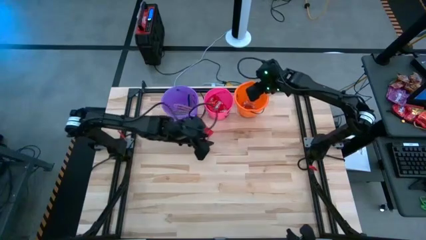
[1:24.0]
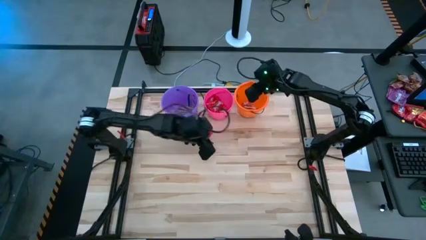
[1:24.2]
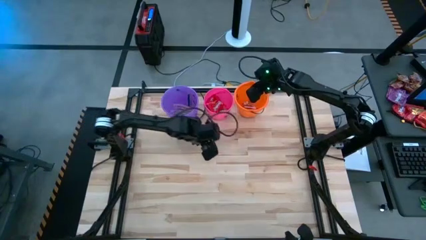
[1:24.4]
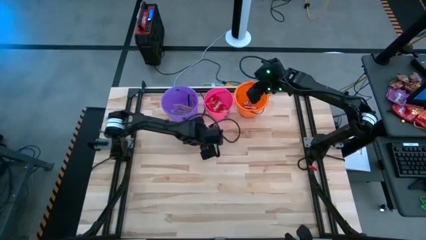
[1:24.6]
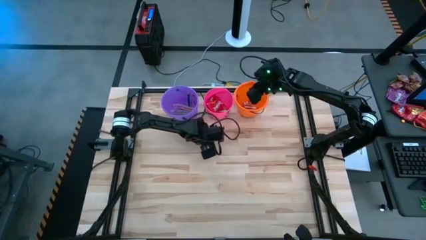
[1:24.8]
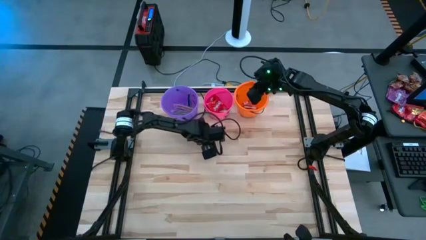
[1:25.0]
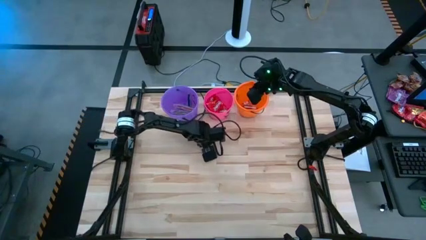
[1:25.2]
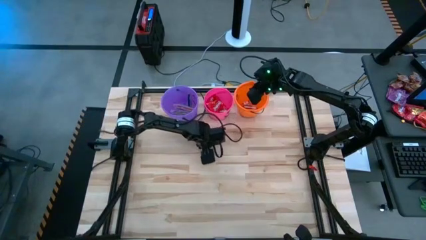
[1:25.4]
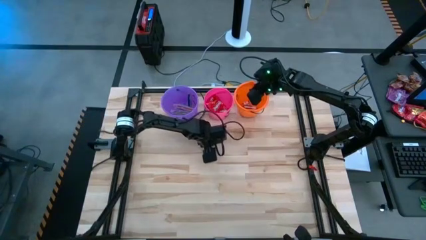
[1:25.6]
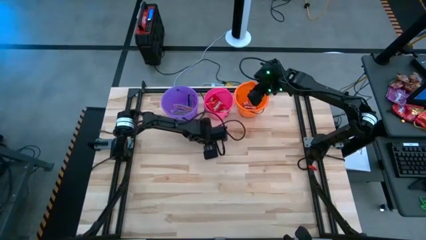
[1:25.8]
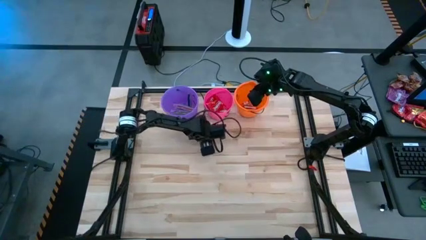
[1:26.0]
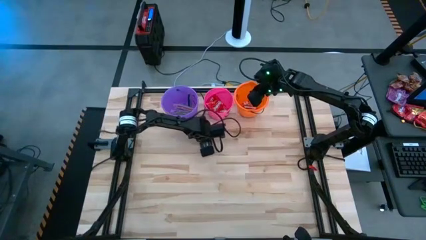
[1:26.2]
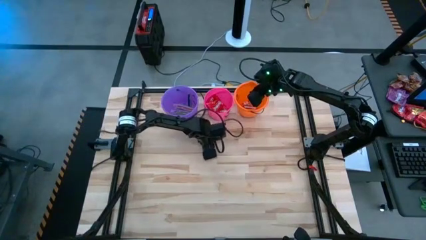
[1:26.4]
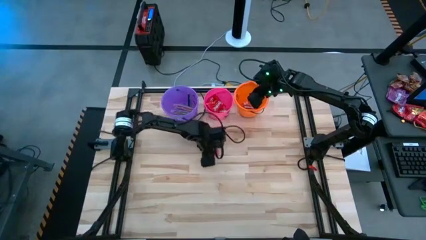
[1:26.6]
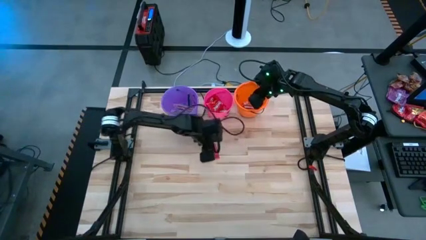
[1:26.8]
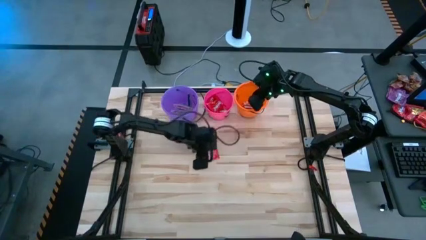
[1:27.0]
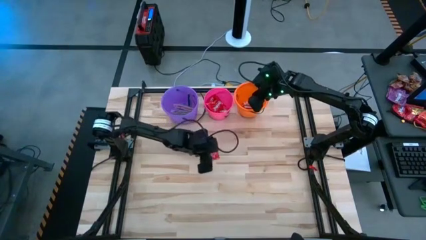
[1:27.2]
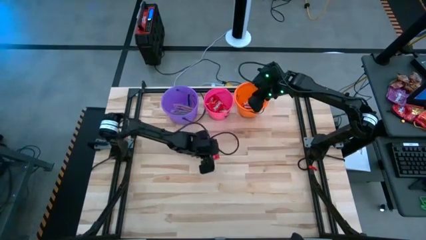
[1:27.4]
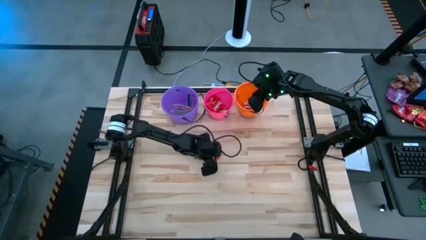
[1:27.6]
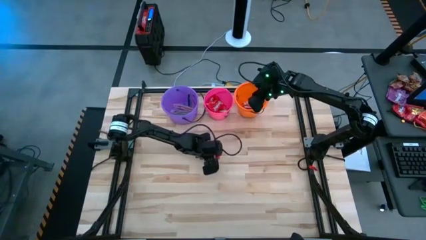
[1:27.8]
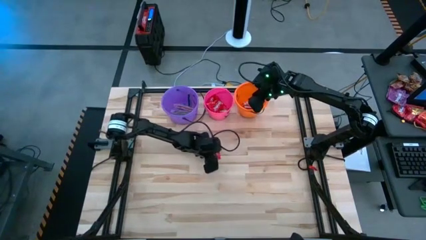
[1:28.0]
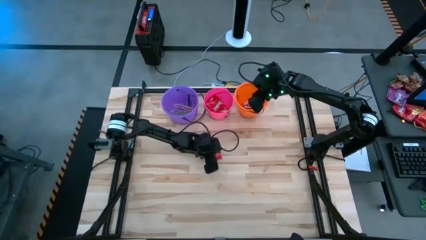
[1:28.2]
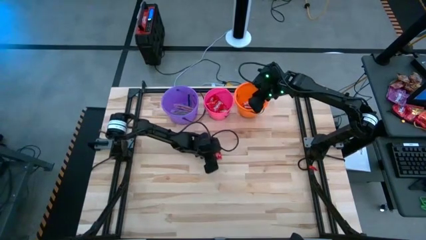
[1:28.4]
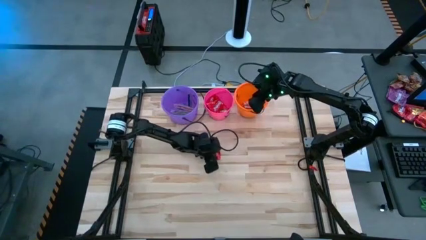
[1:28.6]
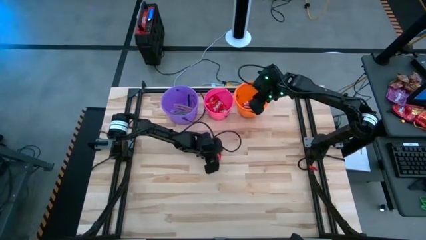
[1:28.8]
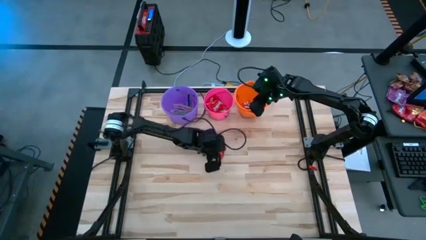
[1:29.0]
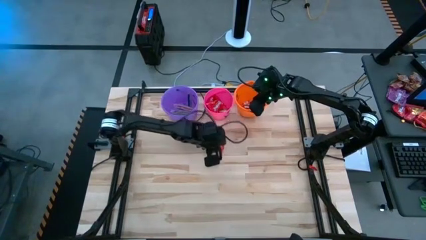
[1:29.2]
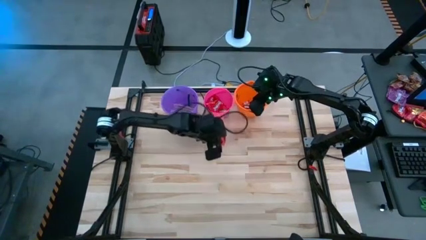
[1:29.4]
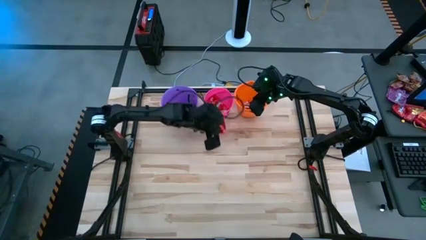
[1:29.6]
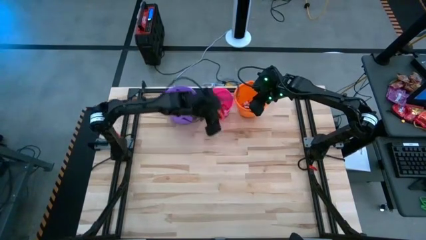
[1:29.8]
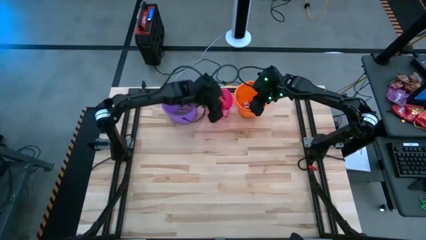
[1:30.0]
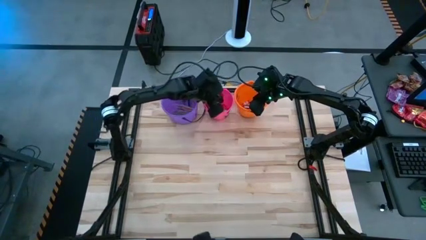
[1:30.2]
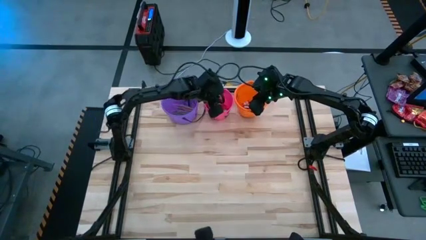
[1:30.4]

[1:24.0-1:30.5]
Task: Sort candy by brand, put in halloween buckets
Put the red candy pack into the pink bucket

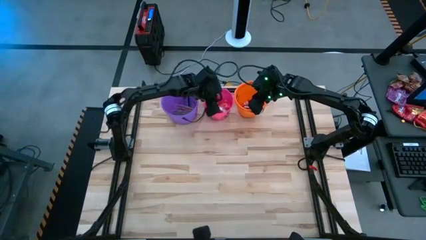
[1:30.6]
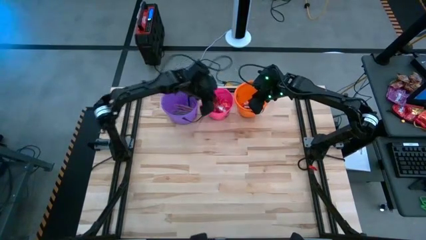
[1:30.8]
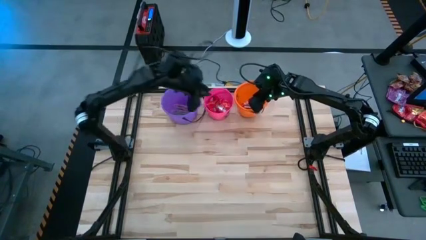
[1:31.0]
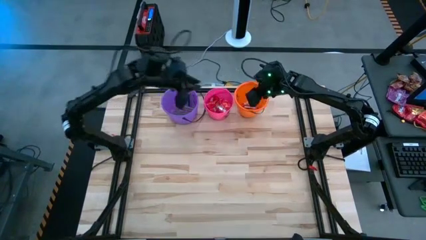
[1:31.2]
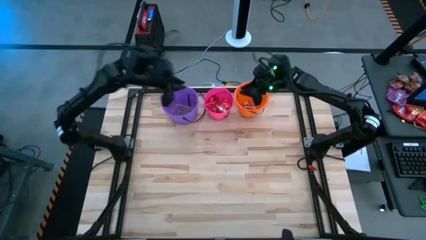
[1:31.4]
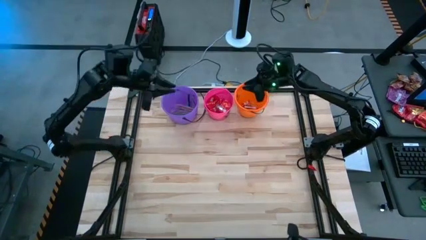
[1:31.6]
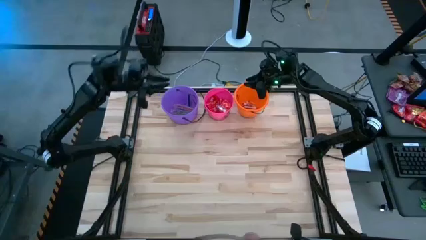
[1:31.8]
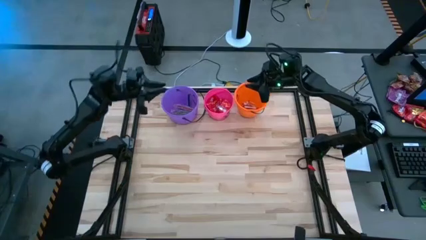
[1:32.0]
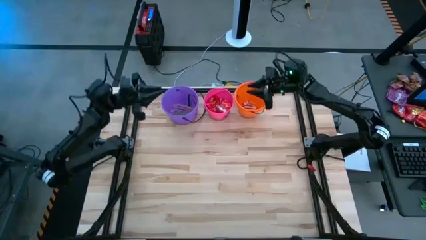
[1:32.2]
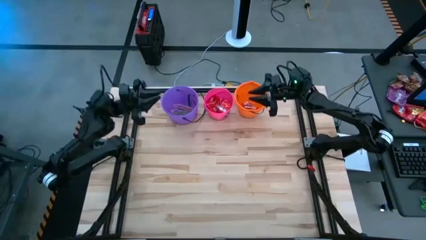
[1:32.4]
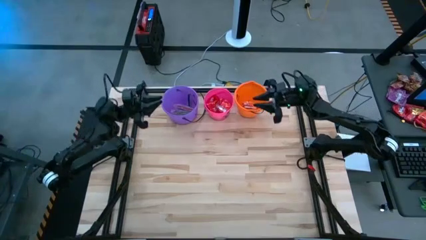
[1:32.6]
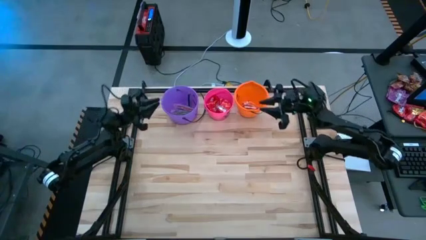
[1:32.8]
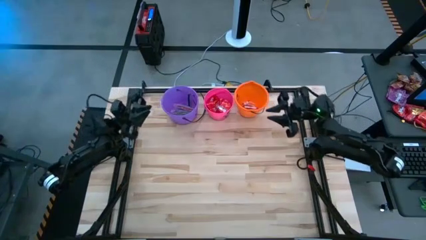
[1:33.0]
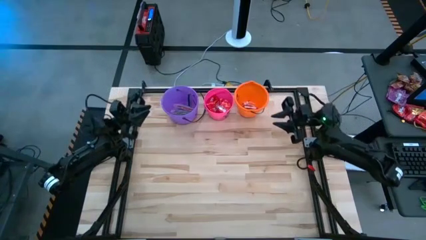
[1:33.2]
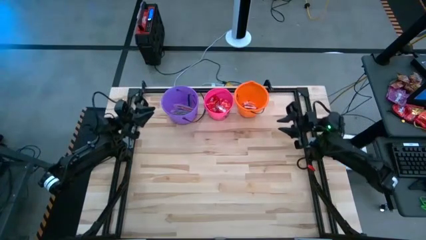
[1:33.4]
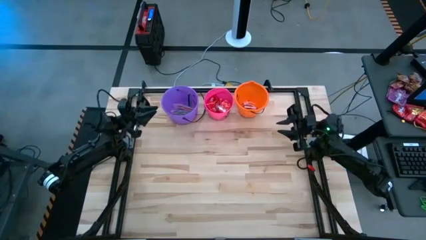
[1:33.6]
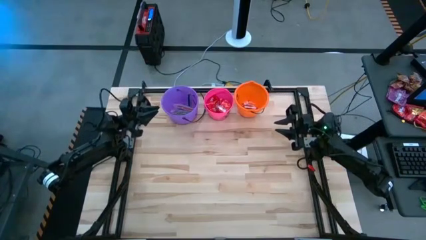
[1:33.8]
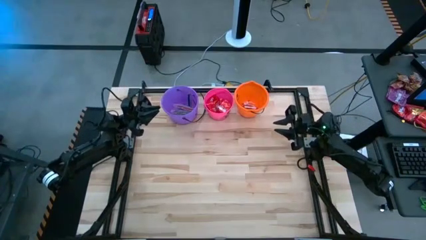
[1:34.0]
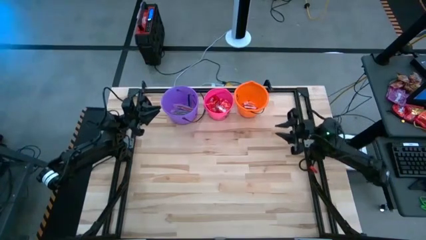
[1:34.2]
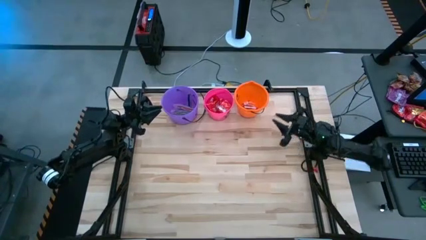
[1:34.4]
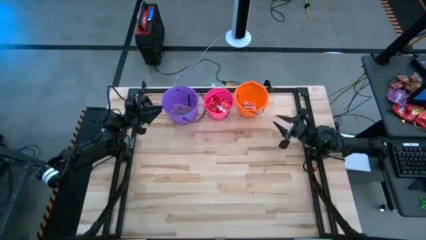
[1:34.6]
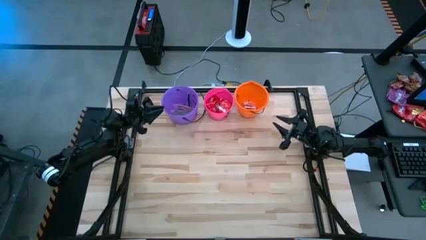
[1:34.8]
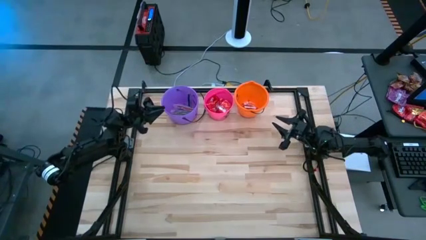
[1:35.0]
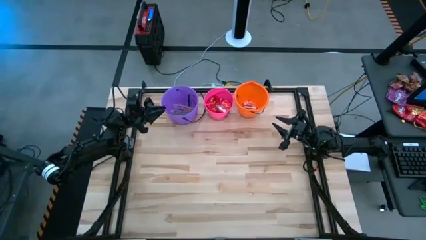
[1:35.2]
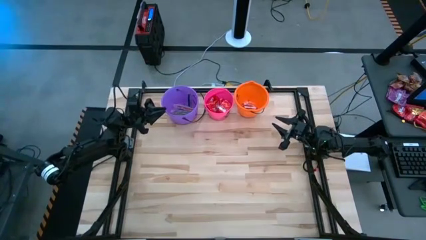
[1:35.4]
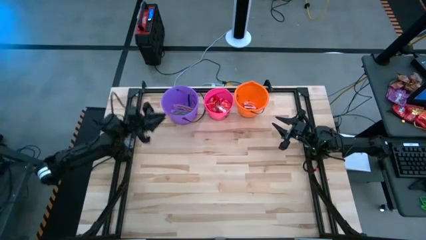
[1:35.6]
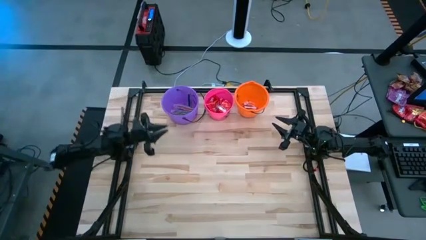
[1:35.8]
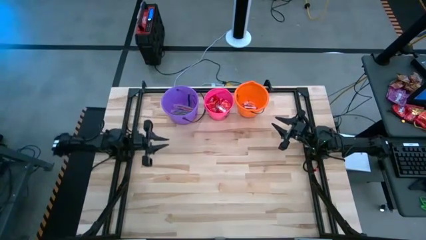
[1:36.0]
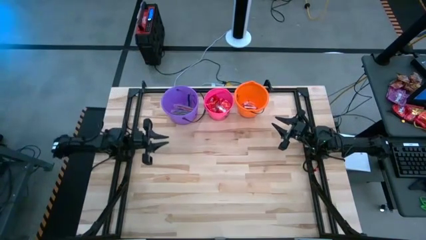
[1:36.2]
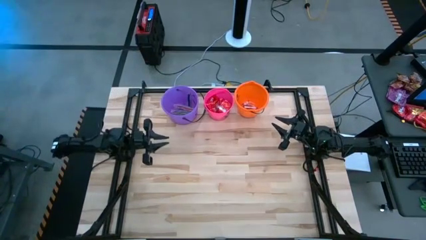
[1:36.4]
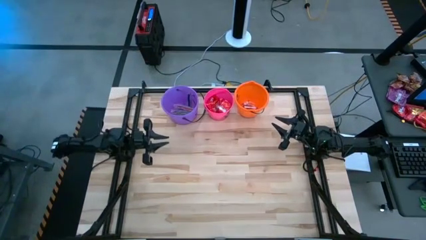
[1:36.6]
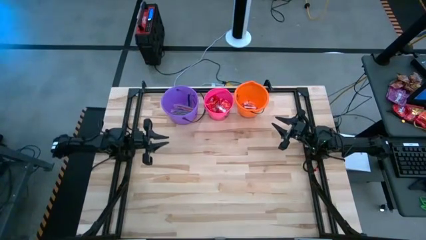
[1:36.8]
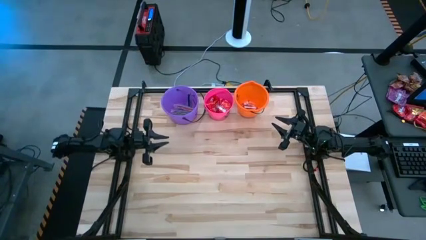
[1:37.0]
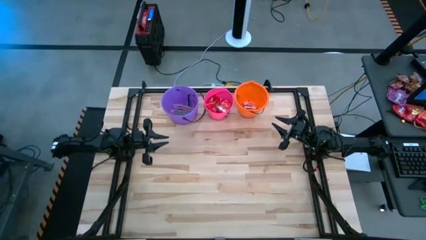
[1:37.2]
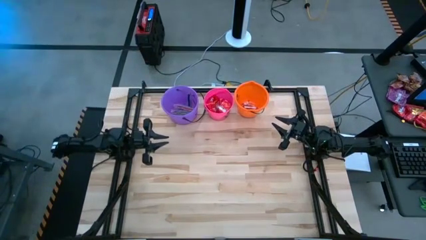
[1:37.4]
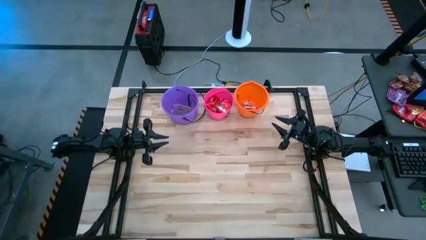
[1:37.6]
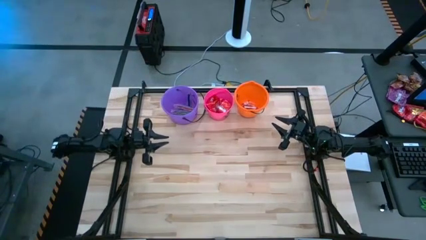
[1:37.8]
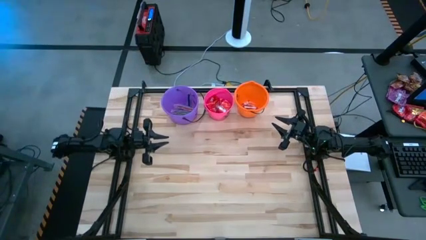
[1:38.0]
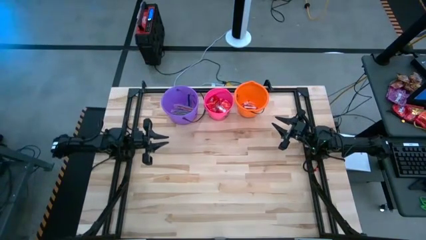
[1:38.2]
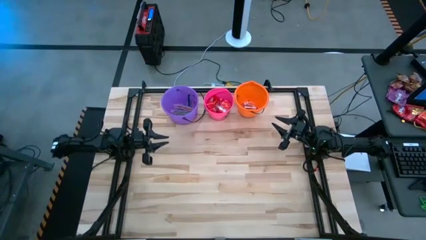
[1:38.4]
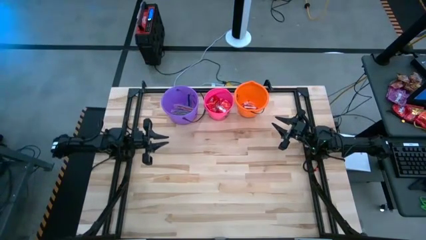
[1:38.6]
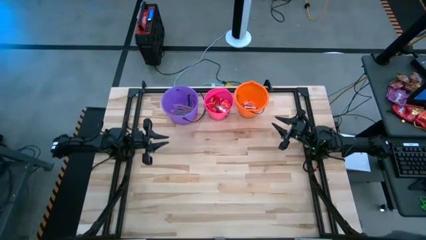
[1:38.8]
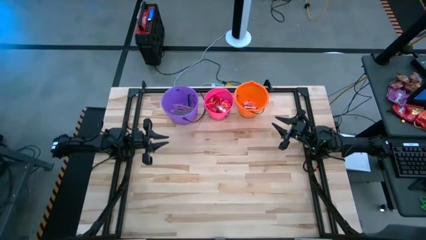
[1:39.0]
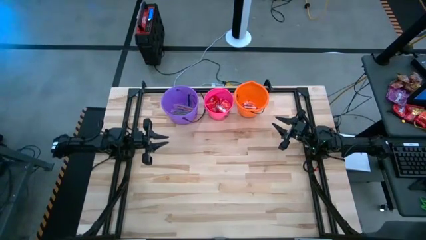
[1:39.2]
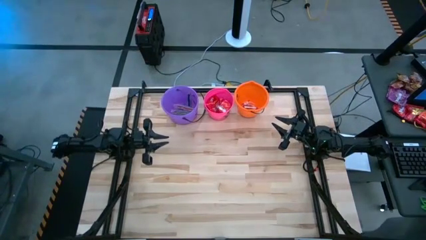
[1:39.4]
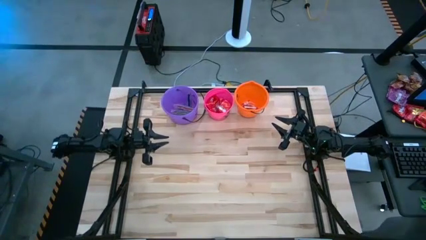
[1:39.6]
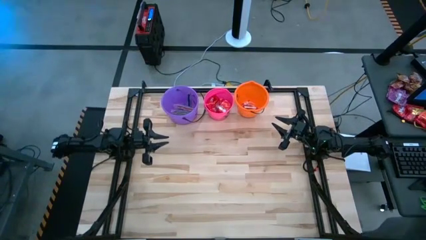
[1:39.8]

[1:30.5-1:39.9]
Return to Home Position
